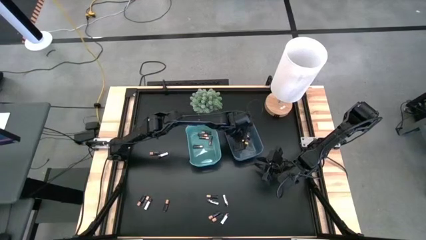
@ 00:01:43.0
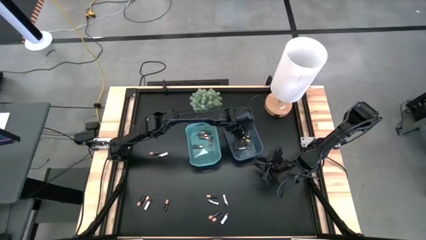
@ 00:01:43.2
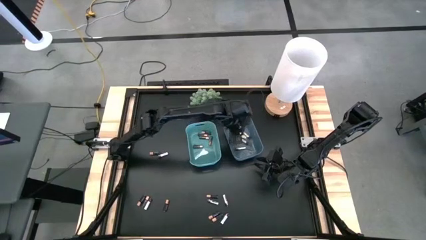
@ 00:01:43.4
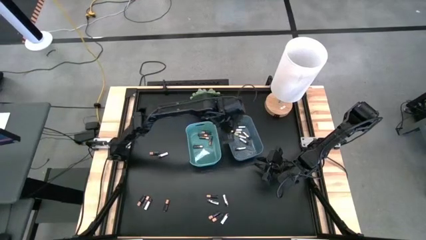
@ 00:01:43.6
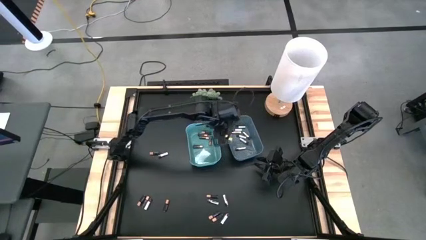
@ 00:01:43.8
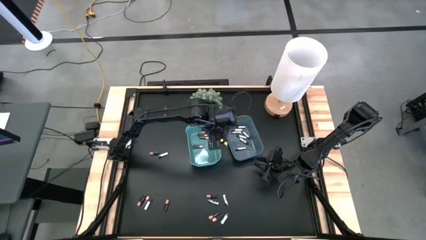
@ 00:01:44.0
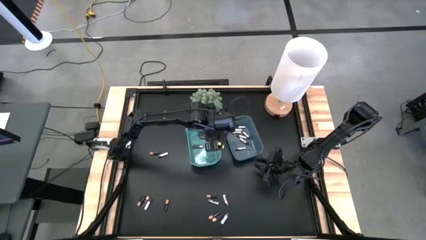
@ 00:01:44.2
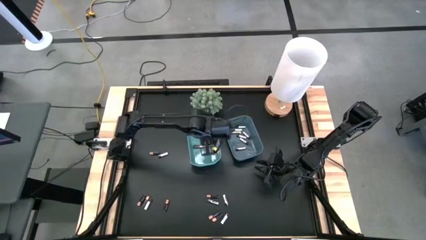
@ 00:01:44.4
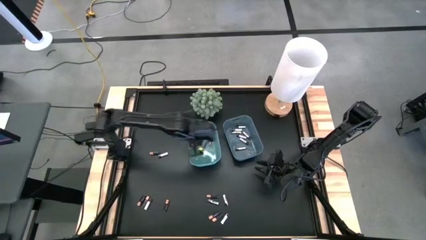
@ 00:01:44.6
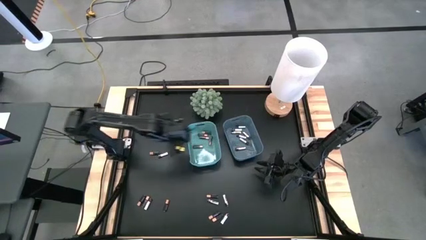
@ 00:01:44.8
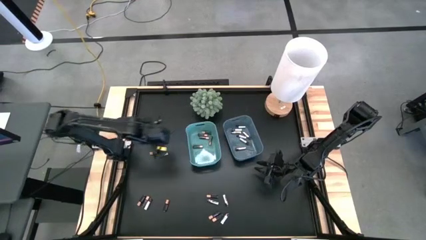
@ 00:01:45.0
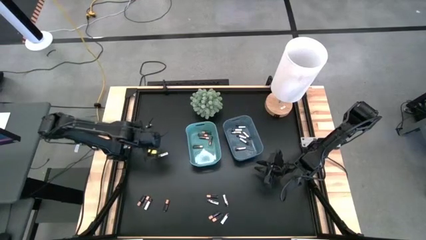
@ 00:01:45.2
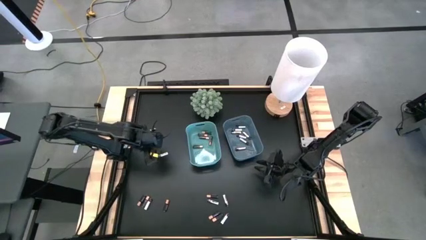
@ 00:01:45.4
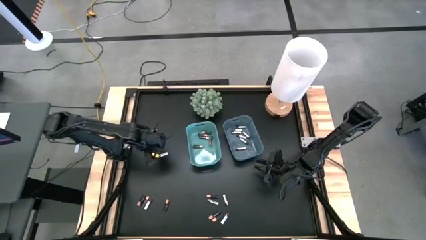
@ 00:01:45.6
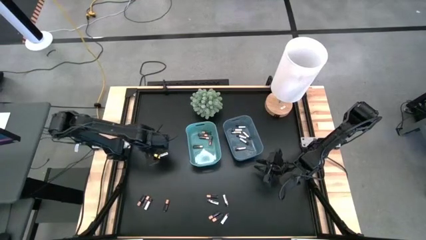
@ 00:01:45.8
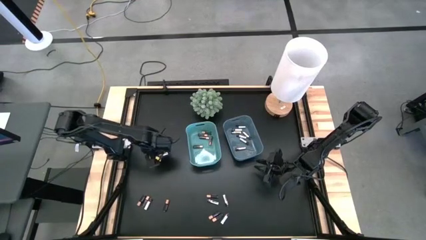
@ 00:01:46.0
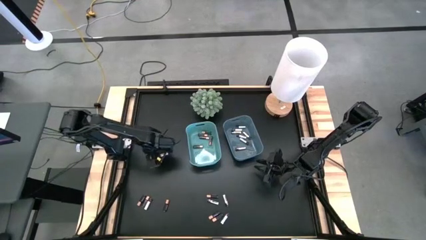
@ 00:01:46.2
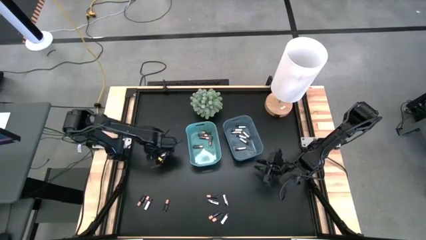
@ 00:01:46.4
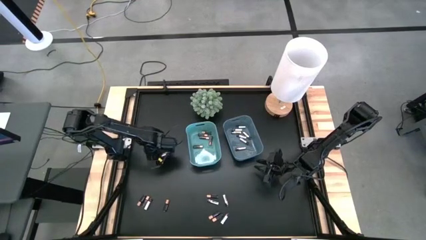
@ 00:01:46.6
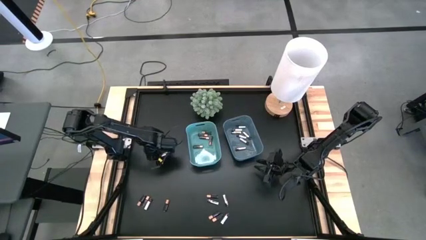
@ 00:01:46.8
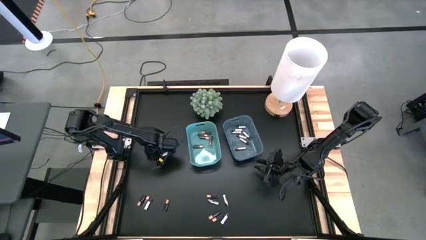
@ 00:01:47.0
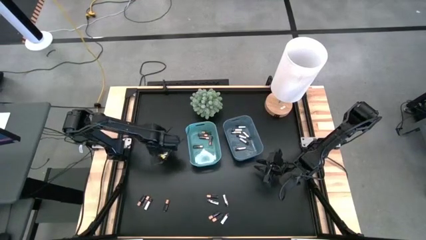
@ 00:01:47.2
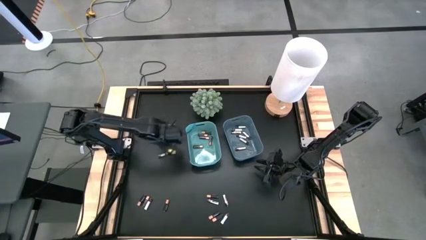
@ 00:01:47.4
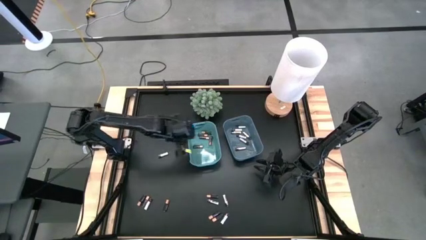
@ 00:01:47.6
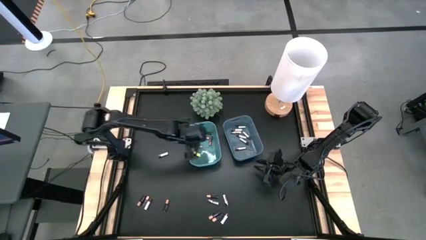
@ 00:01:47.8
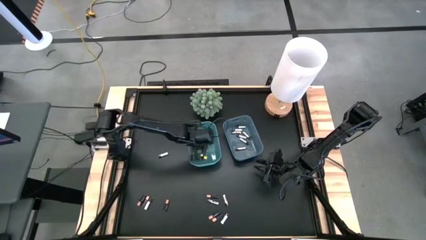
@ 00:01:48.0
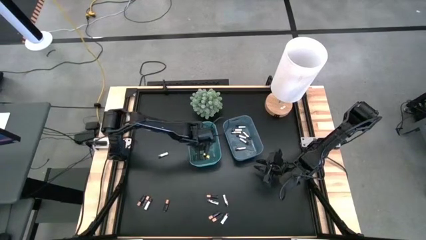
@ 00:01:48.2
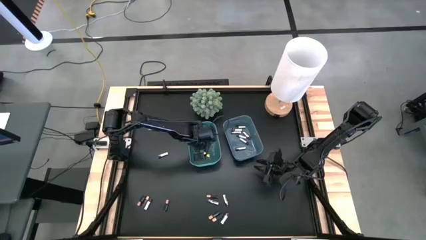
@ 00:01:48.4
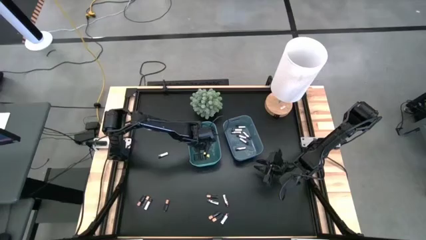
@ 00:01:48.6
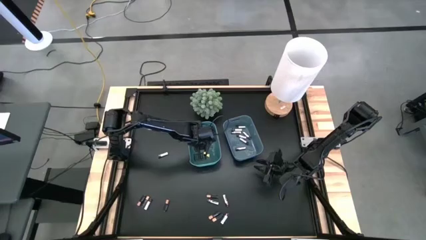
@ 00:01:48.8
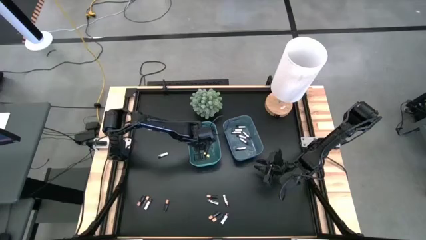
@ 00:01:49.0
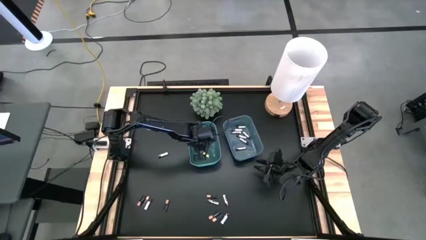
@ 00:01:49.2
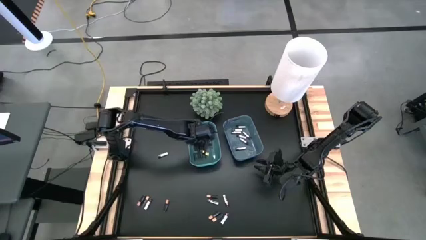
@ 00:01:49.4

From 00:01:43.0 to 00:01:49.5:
Task: Sort batteries
Put the black battery into the green bin

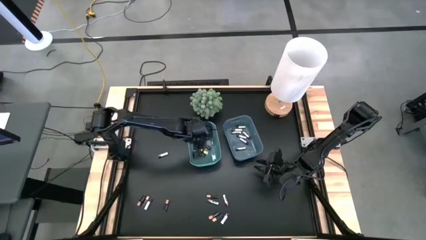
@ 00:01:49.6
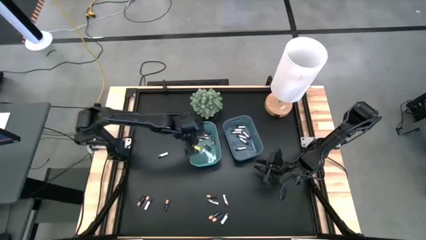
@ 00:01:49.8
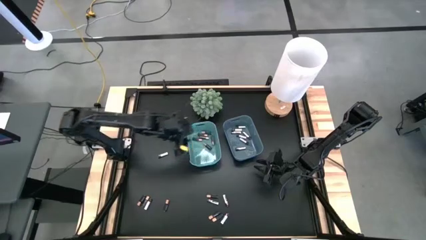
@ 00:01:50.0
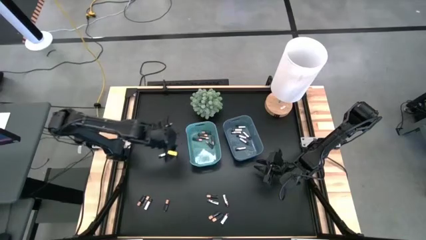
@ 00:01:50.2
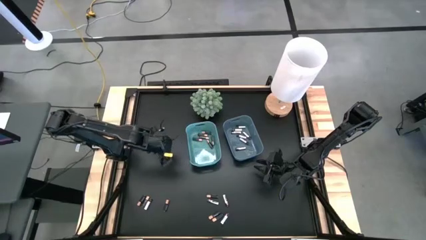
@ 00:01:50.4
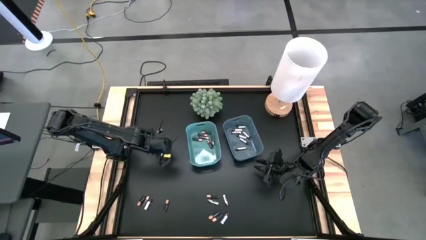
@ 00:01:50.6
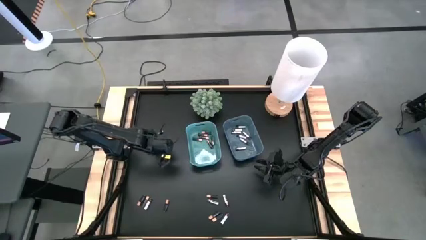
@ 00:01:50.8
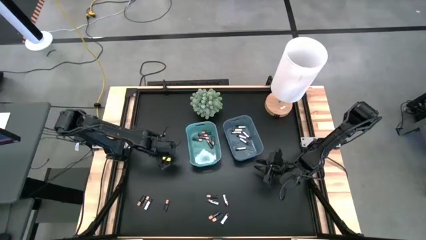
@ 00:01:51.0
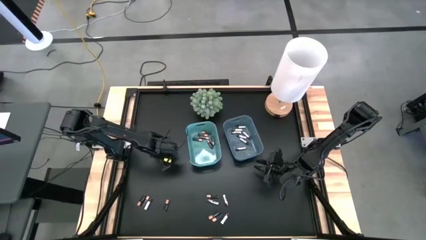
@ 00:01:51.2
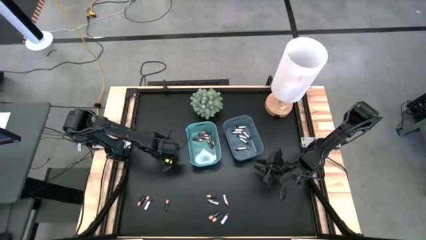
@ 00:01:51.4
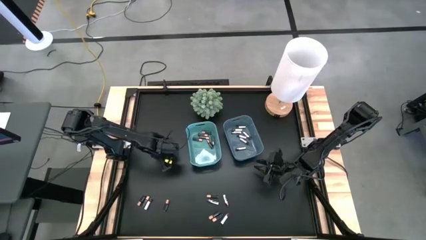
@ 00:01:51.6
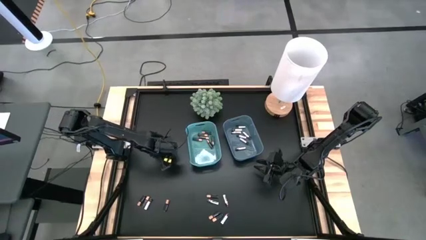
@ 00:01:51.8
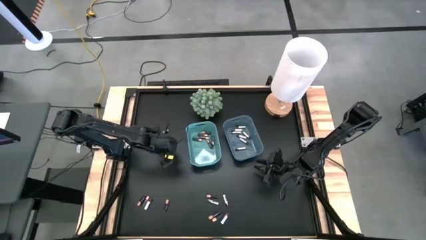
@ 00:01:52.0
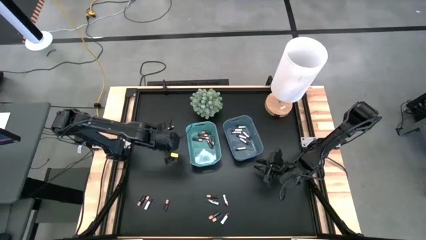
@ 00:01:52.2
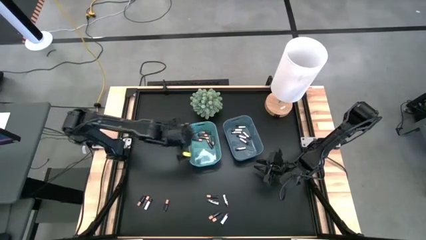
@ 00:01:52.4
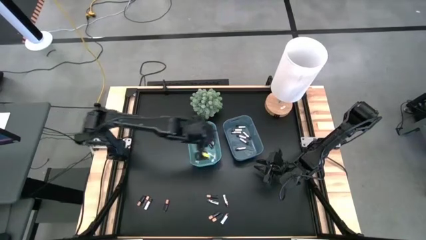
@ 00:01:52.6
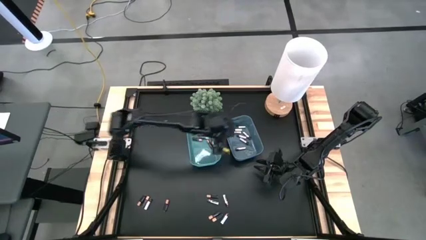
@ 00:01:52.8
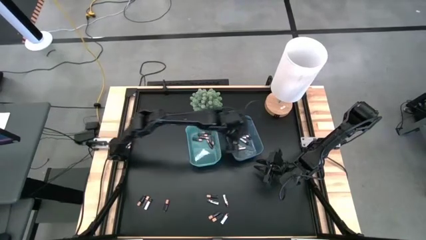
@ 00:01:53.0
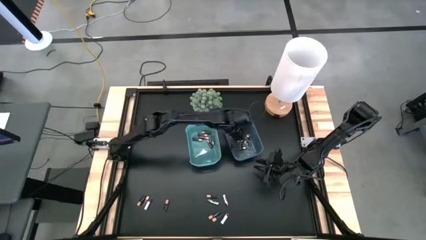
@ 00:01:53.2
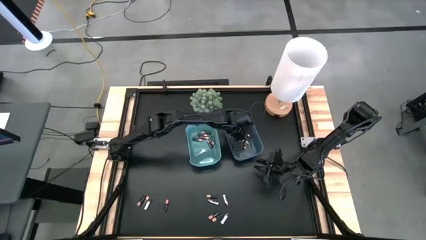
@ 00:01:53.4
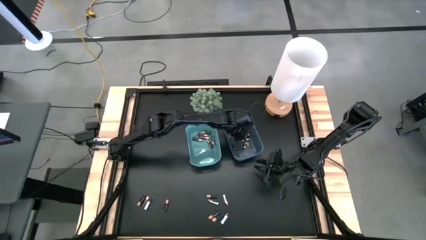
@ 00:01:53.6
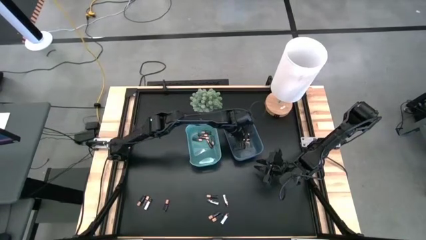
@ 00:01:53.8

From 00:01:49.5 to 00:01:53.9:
Put the white battery into the blue bin

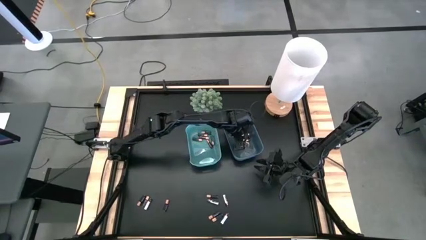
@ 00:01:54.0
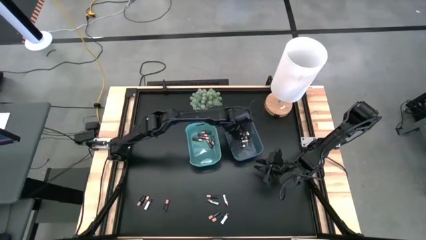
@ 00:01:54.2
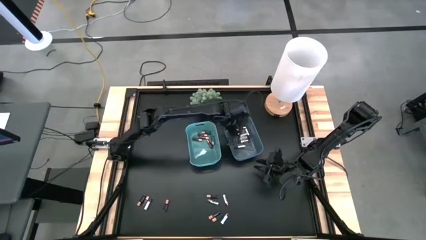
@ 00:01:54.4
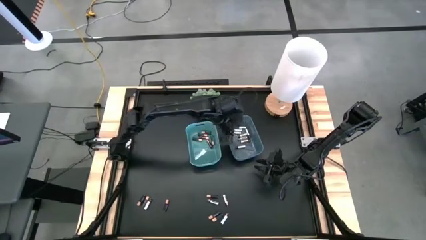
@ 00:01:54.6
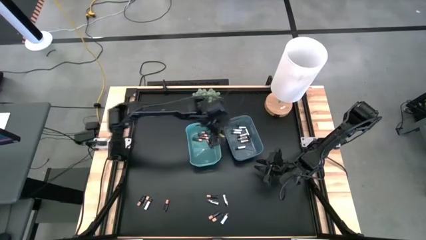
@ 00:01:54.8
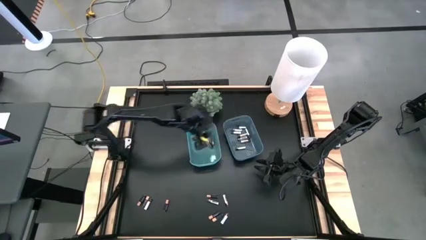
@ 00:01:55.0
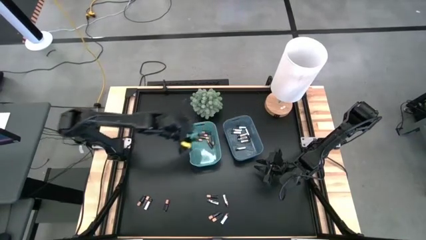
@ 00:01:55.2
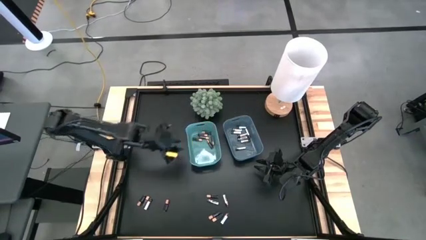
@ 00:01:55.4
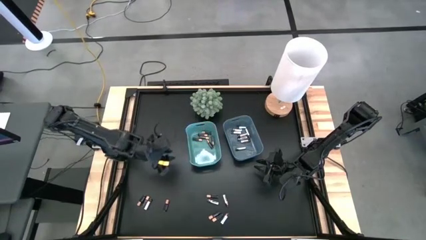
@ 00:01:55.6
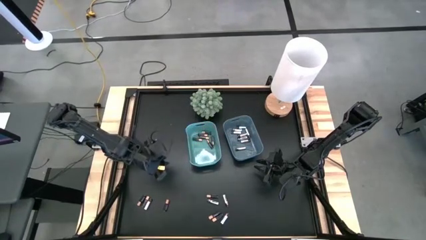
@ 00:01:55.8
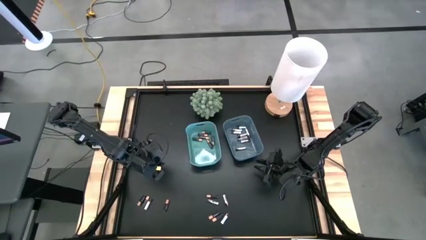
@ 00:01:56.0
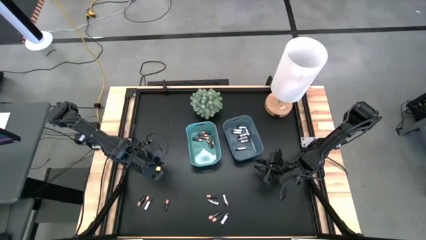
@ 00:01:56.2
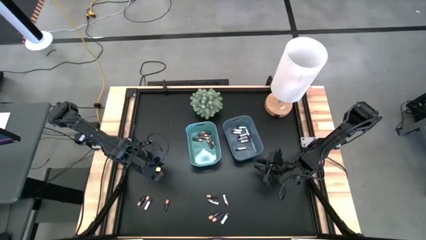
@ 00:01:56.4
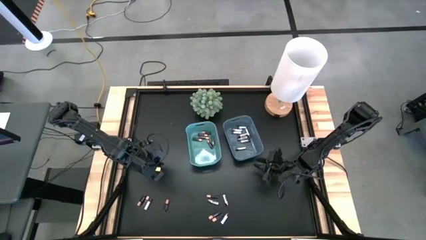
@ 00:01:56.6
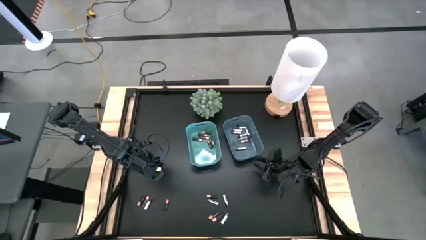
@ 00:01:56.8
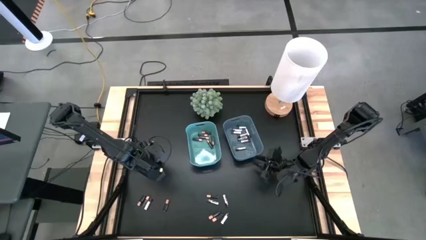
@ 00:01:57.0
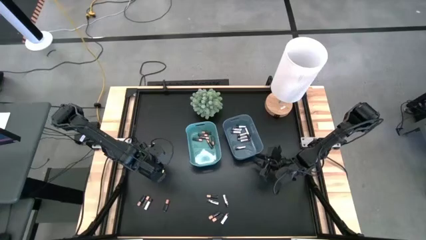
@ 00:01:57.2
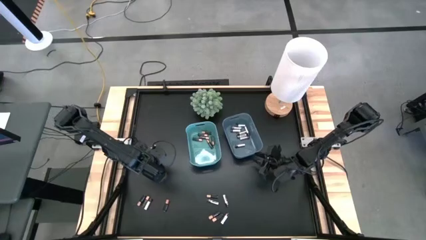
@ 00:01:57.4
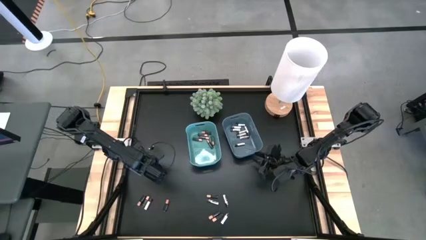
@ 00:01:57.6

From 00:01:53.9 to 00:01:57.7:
Adjust the blue bin on the table

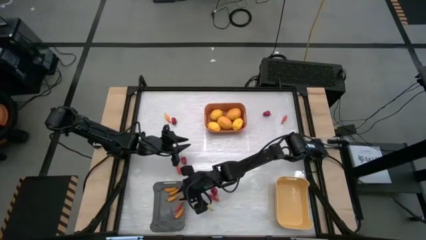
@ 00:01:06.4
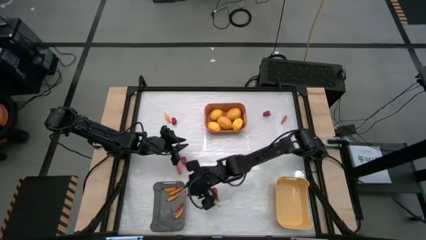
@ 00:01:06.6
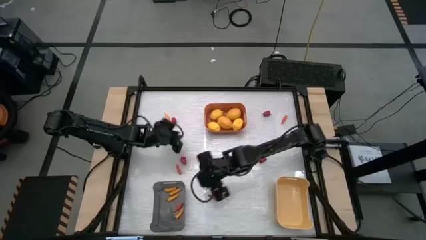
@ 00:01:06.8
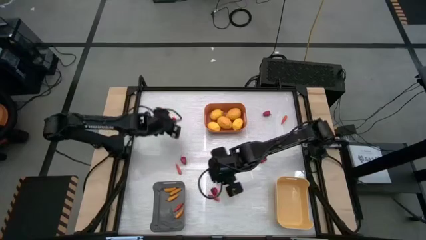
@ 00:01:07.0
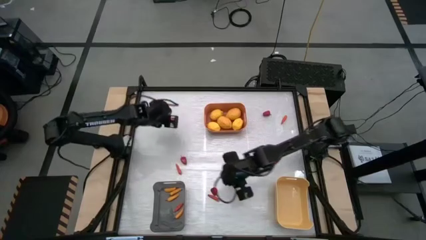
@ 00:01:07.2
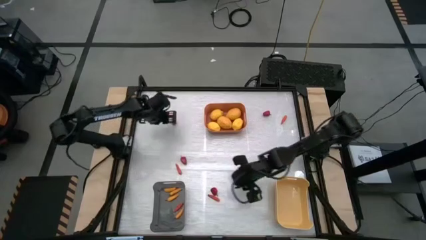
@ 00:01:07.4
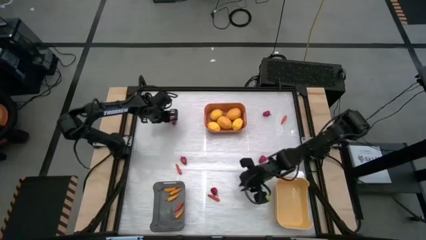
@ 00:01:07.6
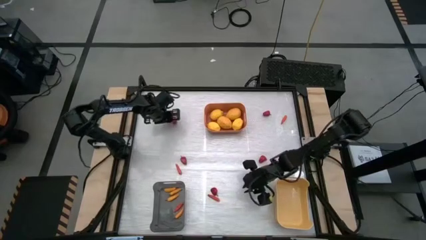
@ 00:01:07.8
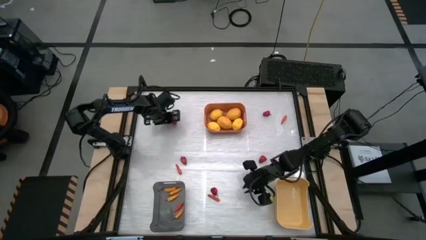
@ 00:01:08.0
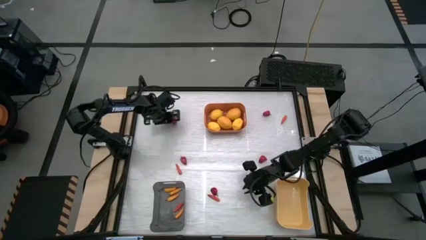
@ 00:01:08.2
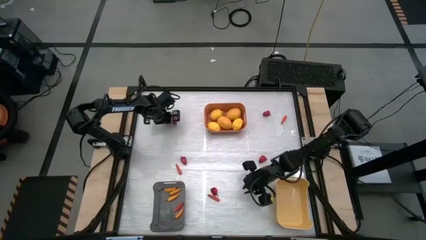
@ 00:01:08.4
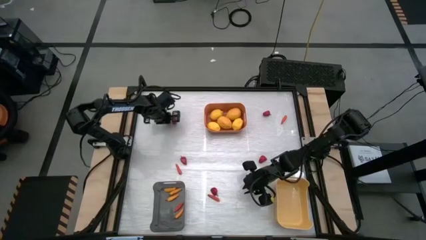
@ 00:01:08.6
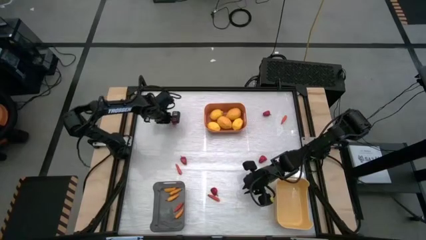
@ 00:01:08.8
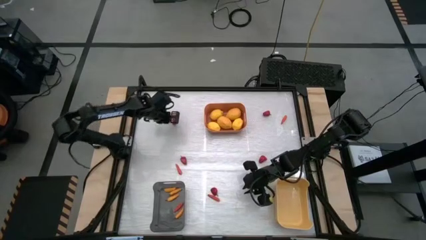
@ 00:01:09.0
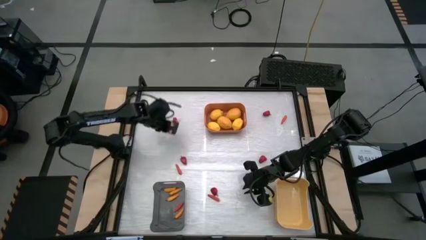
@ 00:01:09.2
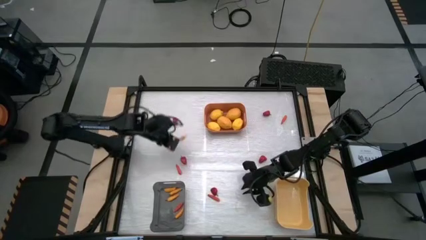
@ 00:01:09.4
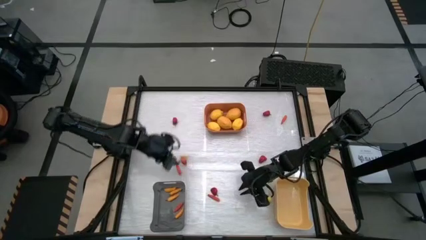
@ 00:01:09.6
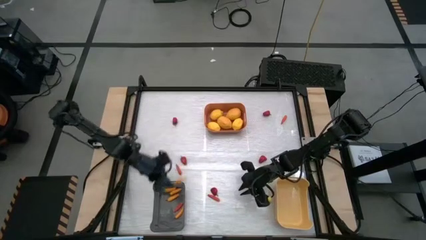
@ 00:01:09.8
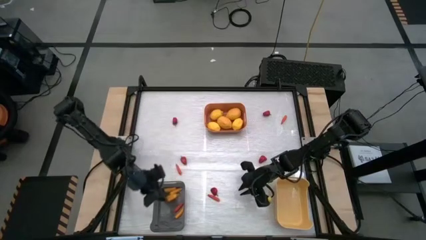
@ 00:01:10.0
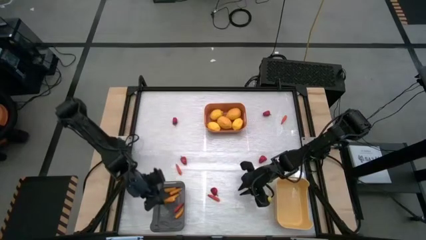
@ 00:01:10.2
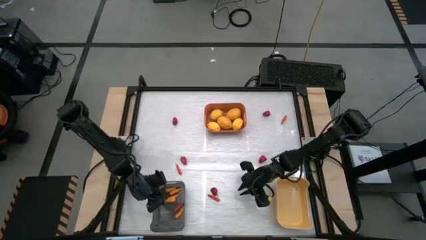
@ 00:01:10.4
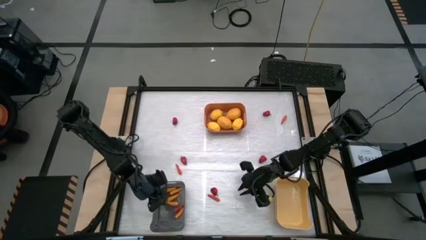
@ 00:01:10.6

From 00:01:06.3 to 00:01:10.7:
Task: Sort produce into baskets
Put the yellow chili pepper into the black bin
